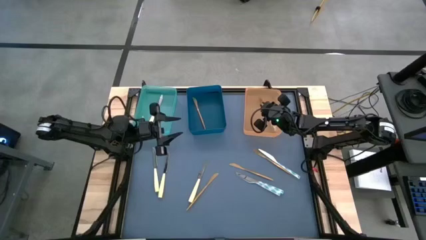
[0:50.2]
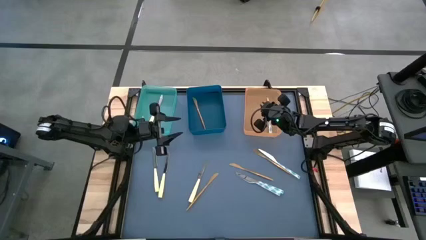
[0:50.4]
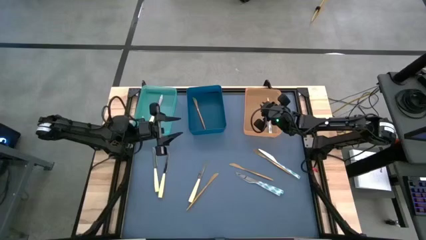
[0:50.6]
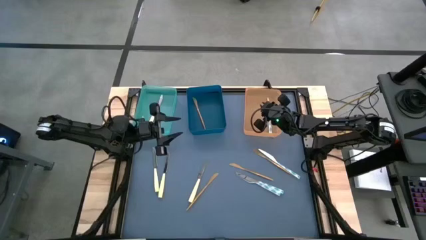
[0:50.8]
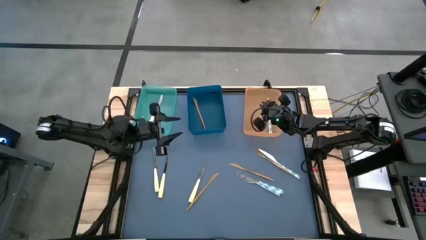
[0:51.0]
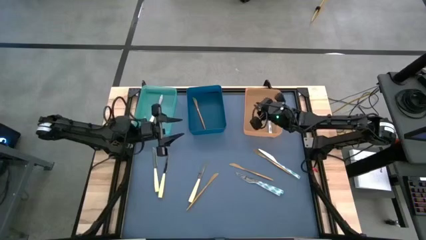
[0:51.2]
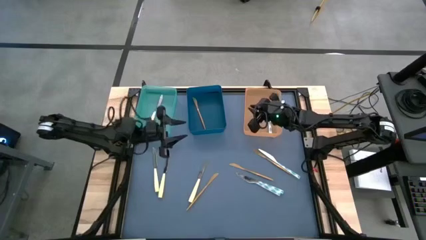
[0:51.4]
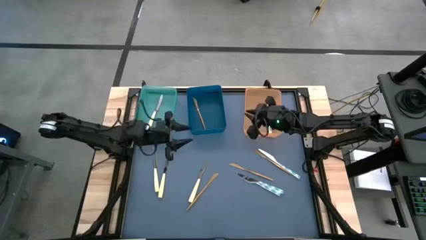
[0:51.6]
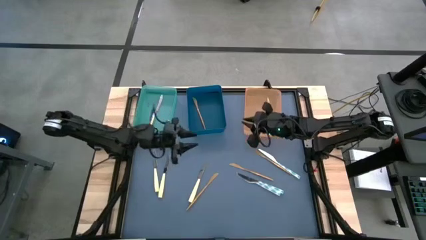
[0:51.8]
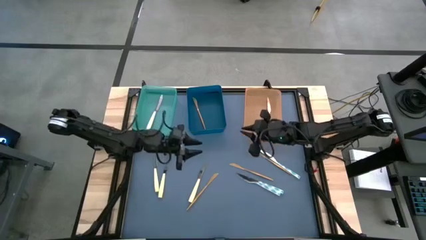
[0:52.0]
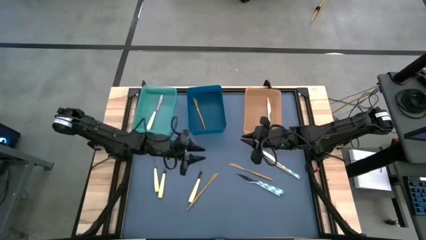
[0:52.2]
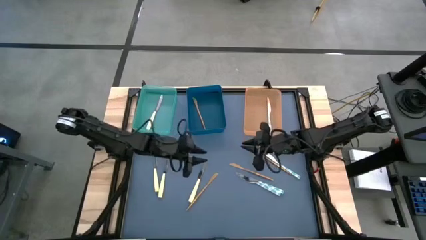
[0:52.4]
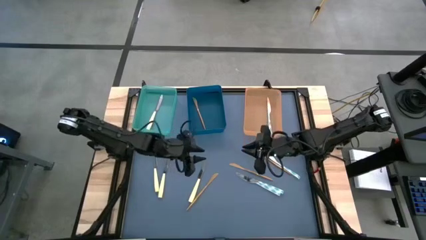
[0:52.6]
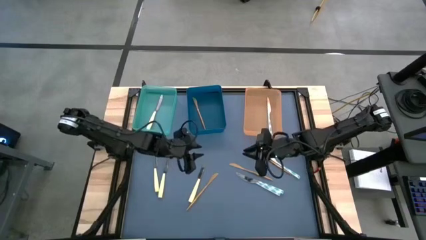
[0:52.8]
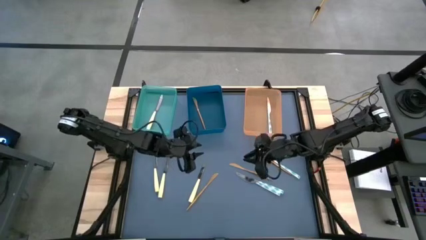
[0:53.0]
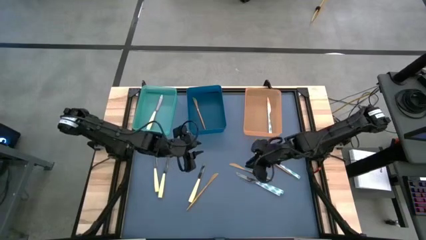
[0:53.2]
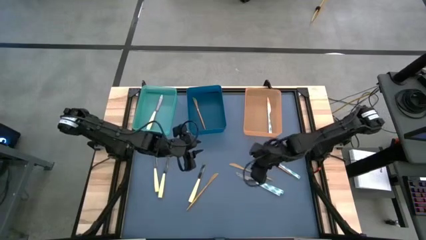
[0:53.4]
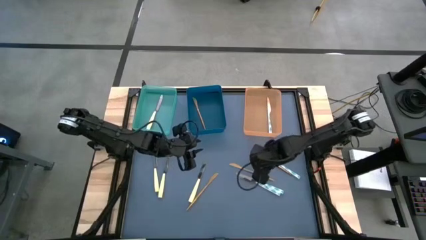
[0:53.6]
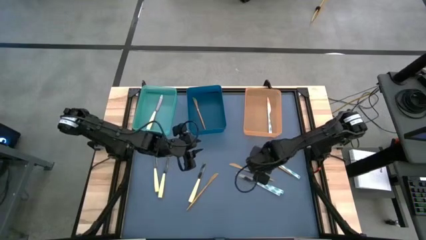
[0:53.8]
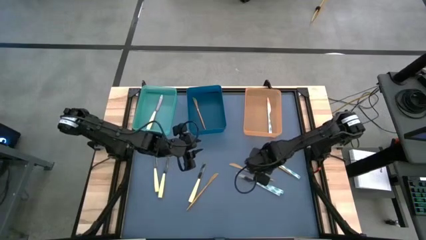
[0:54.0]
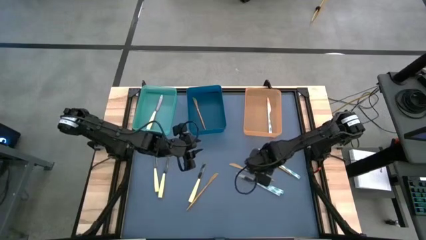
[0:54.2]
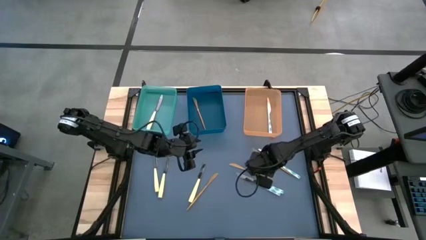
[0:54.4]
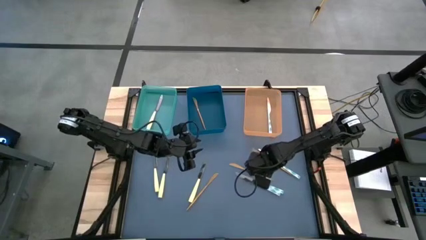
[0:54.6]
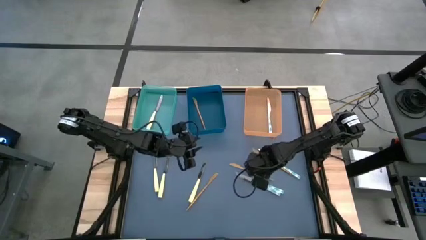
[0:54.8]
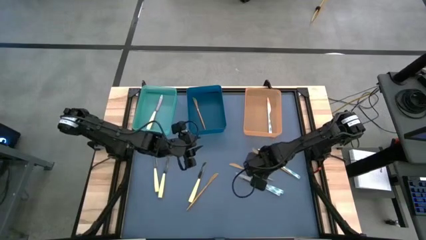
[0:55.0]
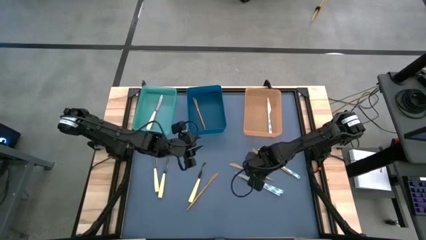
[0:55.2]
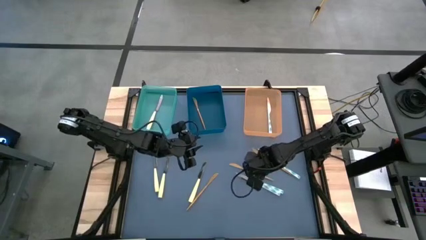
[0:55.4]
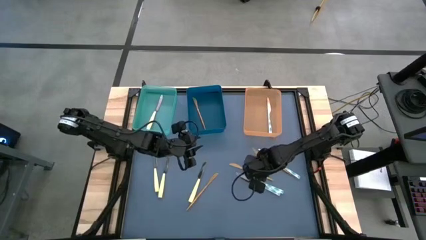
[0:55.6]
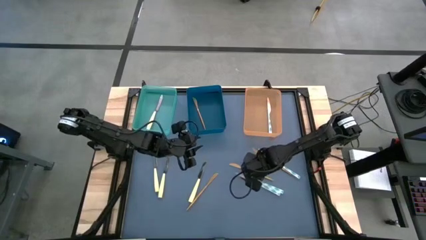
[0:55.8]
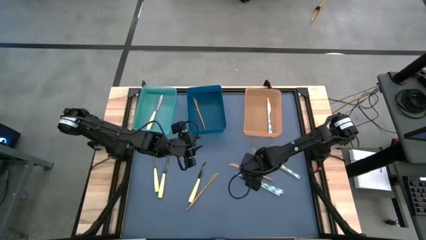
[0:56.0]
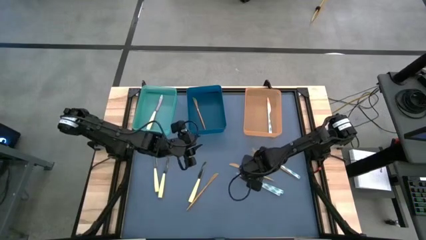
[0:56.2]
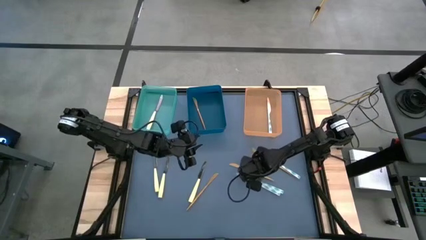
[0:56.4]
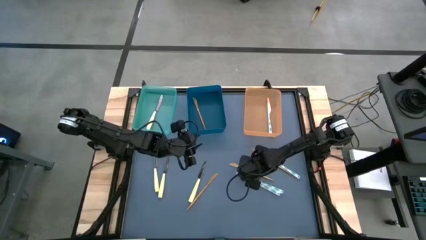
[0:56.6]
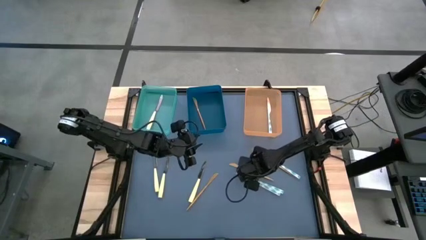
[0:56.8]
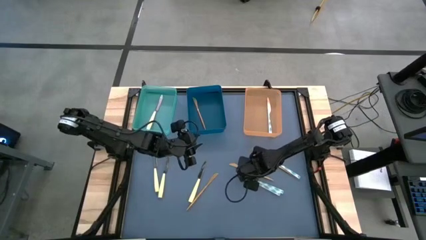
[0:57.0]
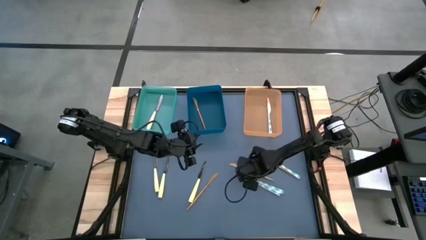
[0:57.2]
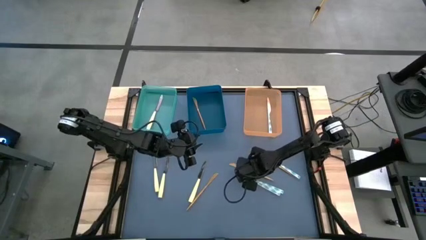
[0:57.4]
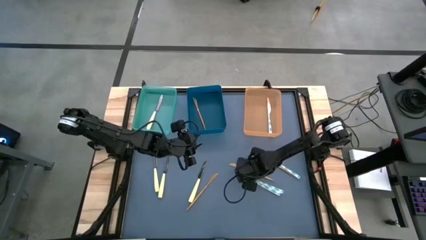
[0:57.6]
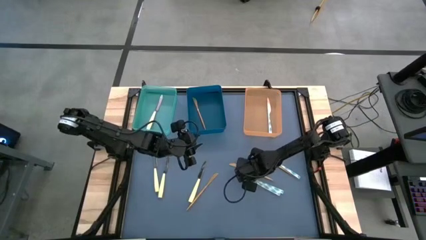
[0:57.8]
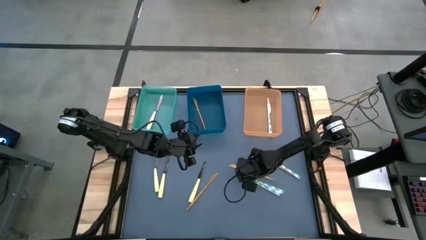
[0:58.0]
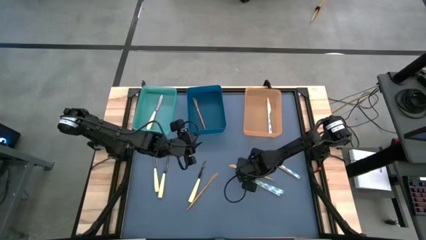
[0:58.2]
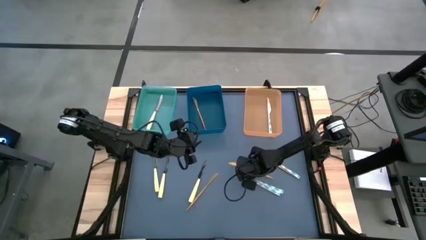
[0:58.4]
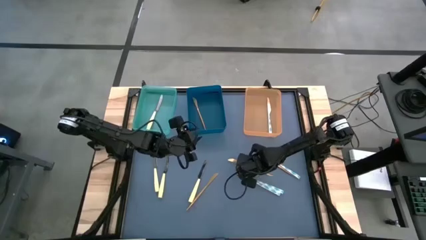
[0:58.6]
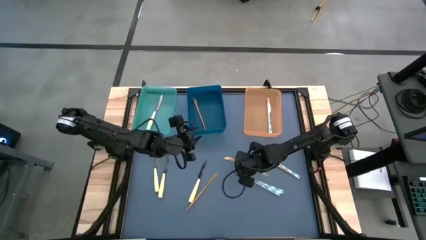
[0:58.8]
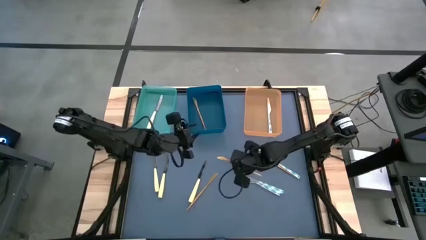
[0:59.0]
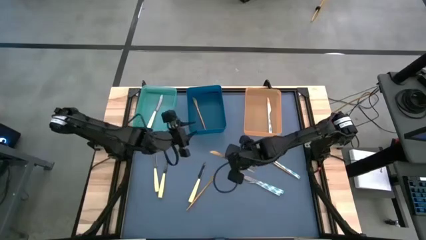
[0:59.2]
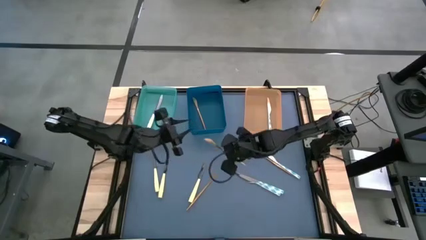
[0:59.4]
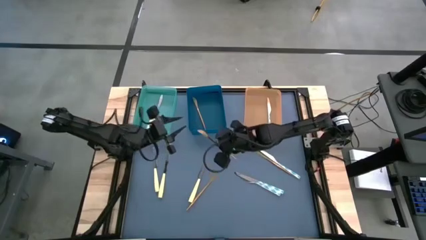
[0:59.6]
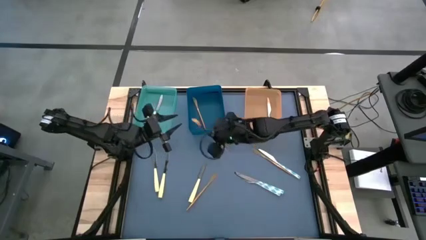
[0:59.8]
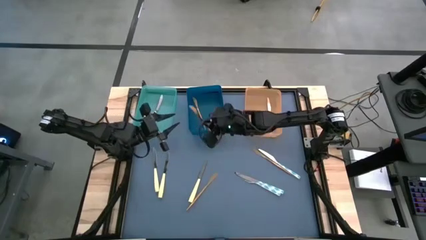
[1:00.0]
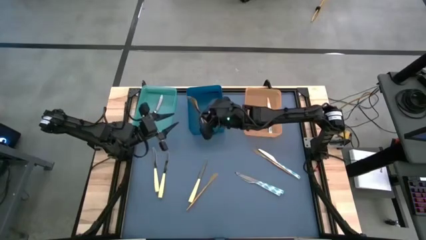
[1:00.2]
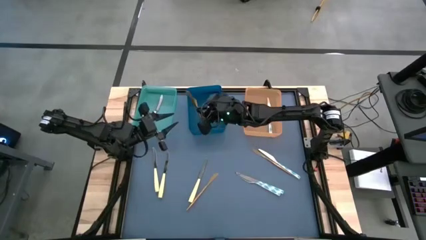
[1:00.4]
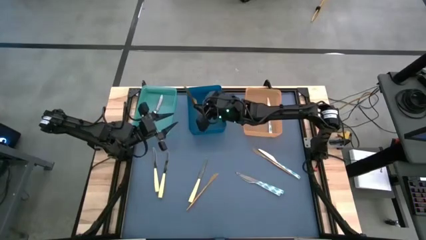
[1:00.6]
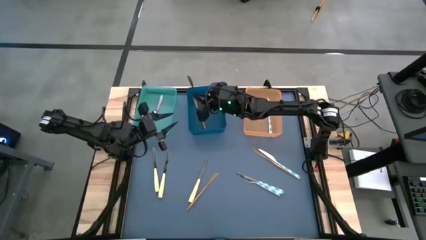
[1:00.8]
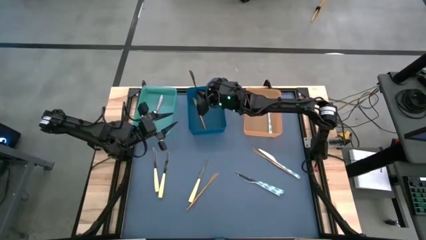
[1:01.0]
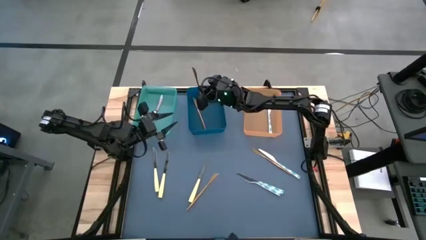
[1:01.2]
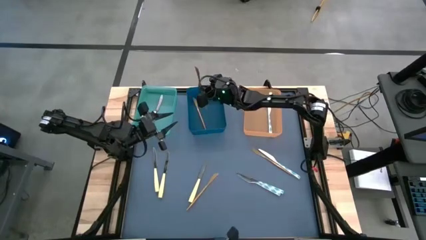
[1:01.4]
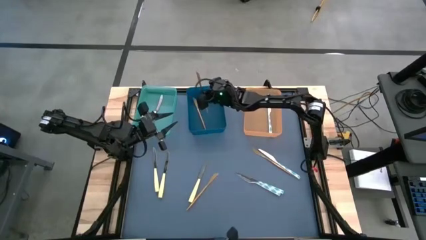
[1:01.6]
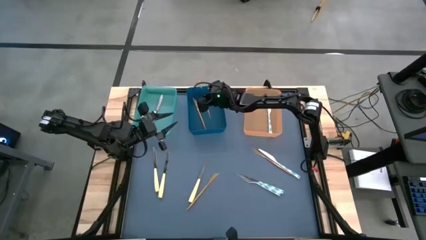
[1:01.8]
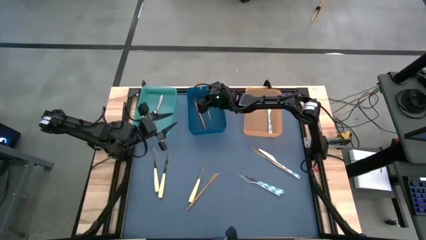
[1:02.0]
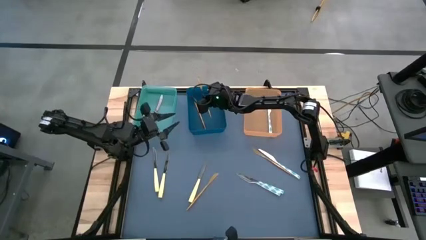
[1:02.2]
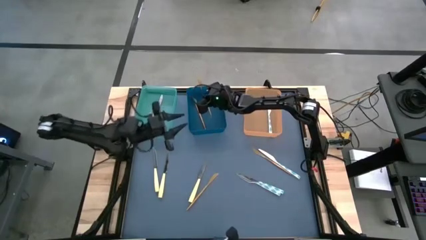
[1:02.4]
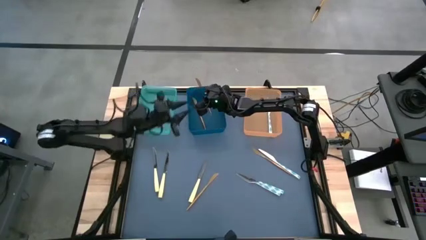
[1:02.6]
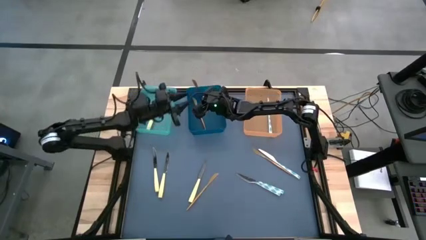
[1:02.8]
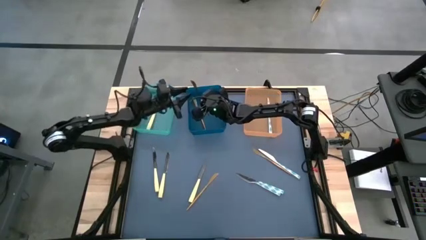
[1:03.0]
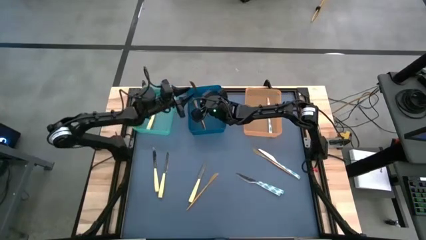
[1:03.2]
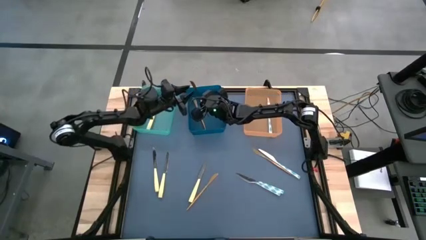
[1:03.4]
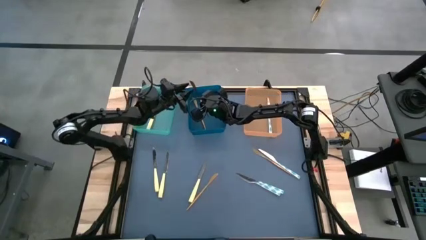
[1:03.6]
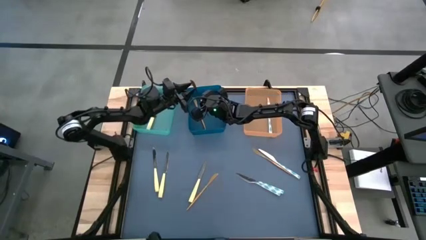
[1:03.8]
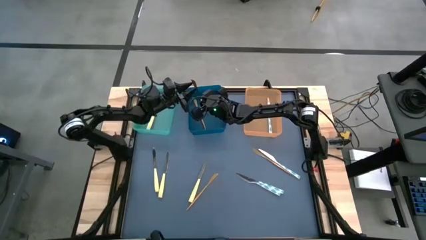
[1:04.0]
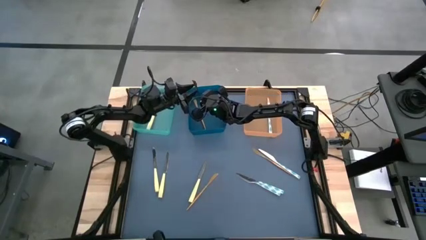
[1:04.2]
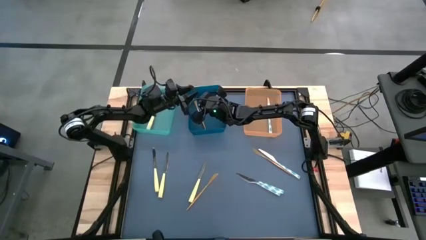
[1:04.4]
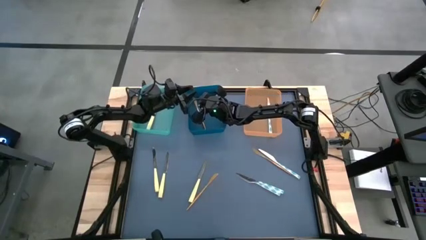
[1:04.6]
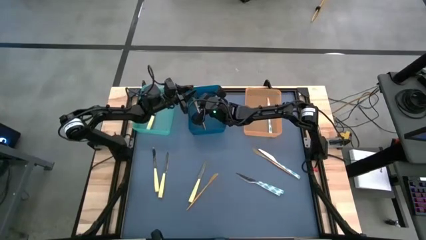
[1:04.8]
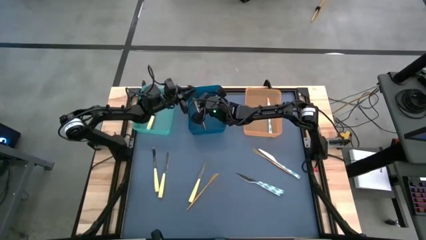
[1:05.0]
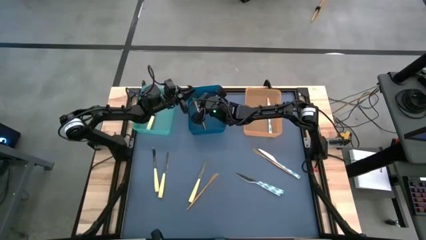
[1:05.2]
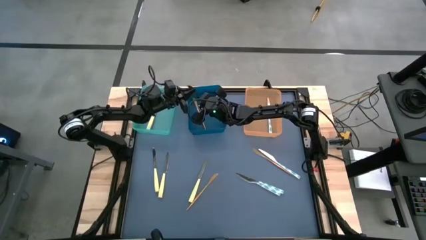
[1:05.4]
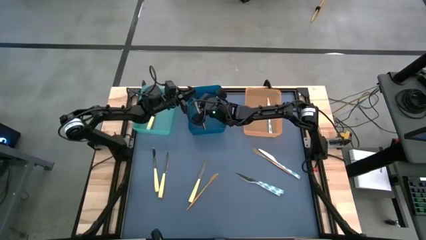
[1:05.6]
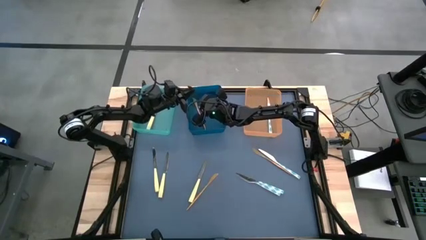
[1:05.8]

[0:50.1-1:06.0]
Task: Sort silverware by color (type)
Put the gold table knife into the blue bin
